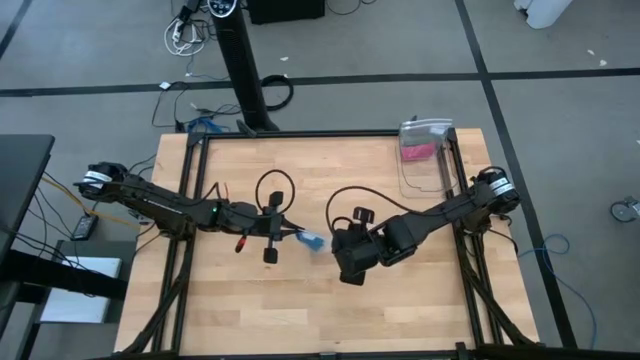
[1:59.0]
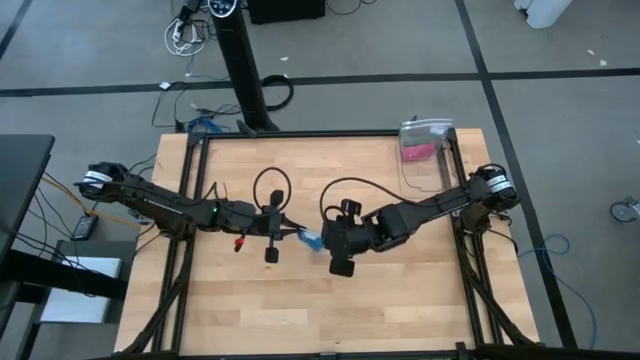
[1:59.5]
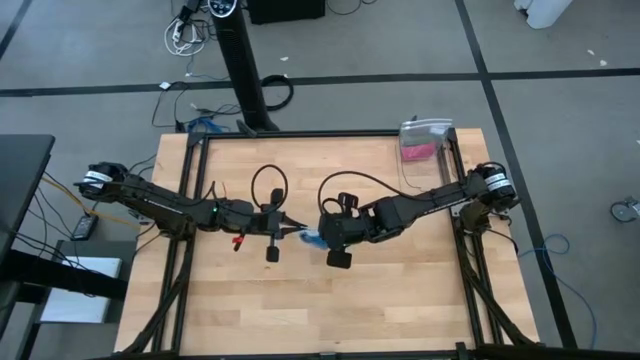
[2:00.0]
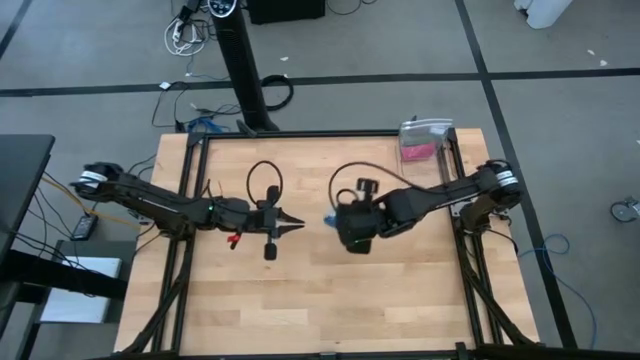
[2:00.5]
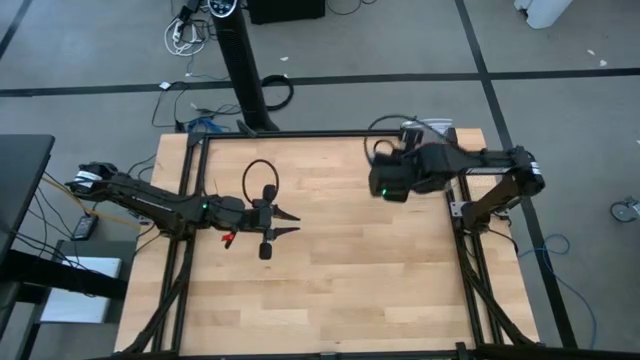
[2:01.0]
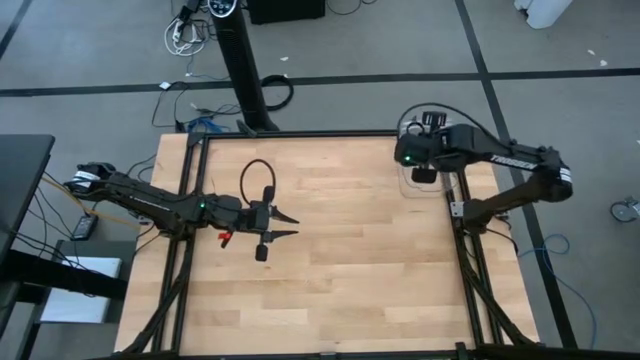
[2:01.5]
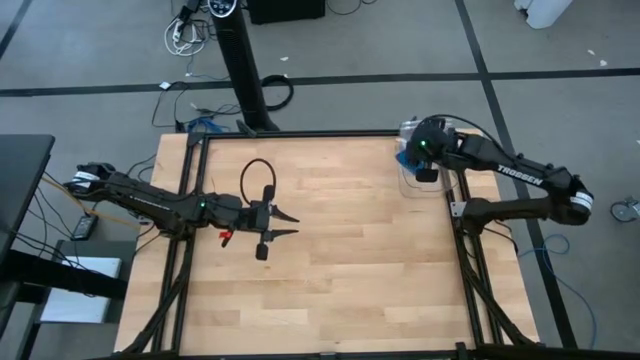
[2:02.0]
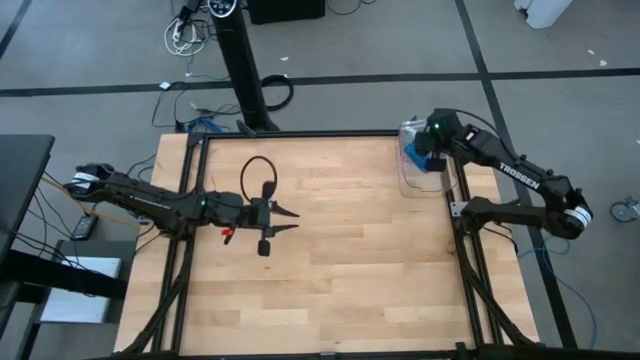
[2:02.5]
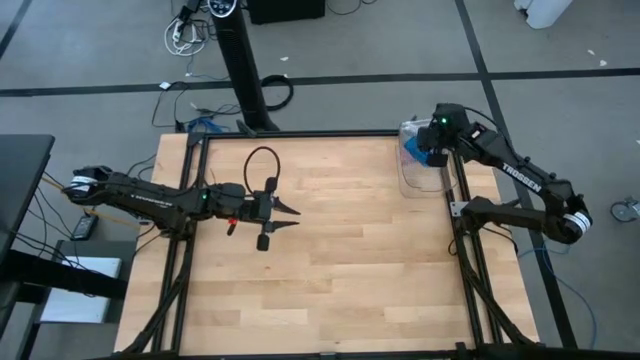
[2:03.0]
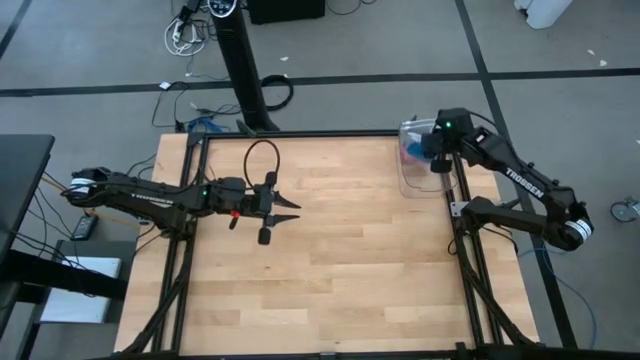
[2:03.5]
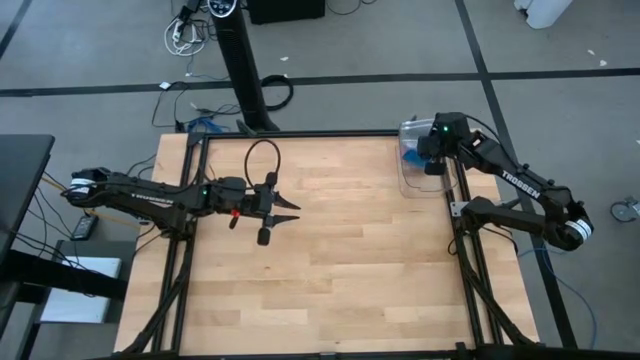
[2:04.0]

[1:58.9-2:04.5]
Task: Roll bandage
Put the transparent zip bag with the blue rolled bandage into the transparent bin

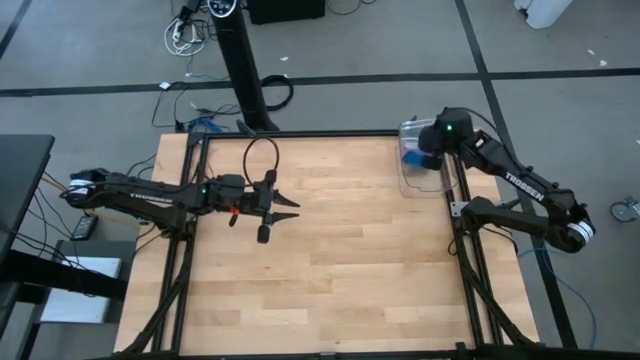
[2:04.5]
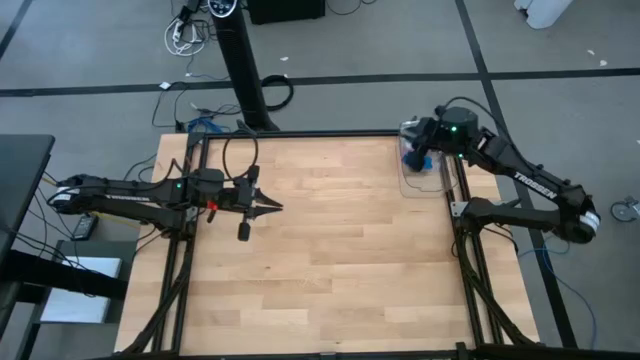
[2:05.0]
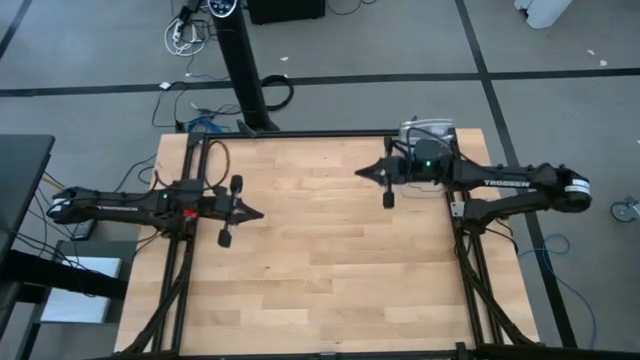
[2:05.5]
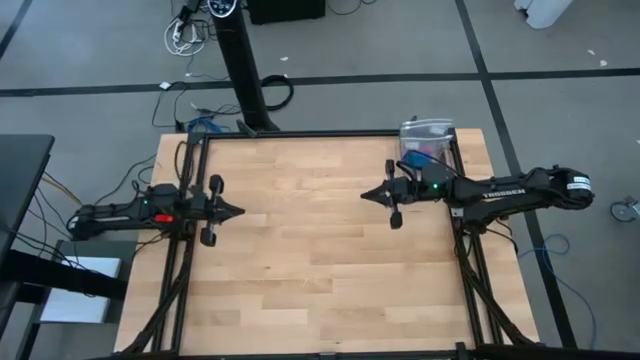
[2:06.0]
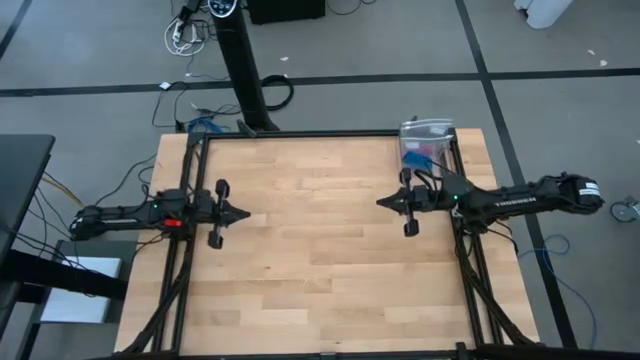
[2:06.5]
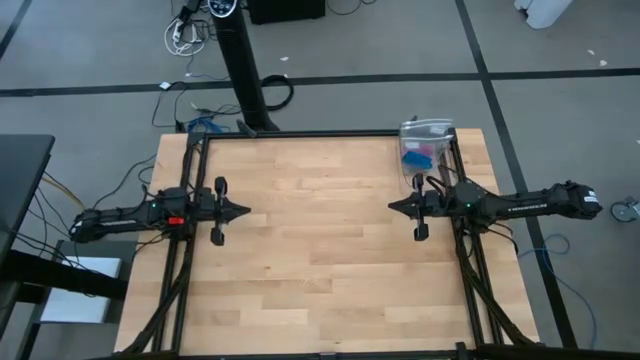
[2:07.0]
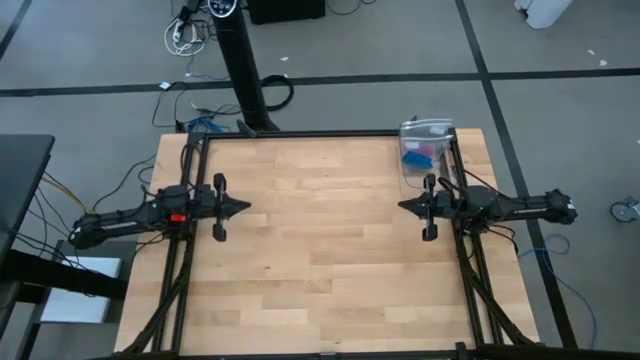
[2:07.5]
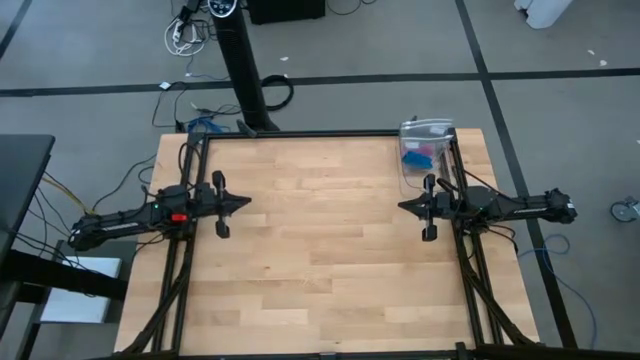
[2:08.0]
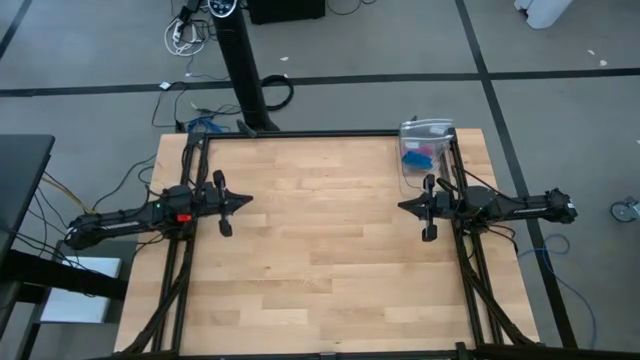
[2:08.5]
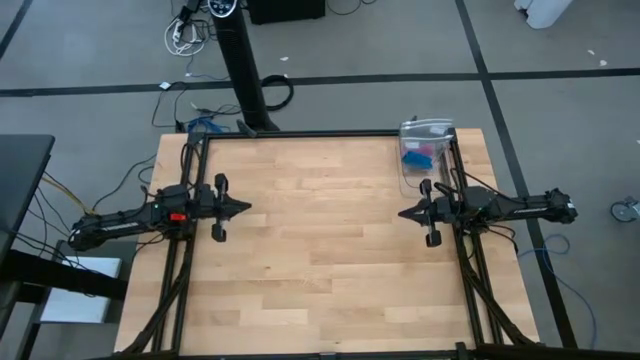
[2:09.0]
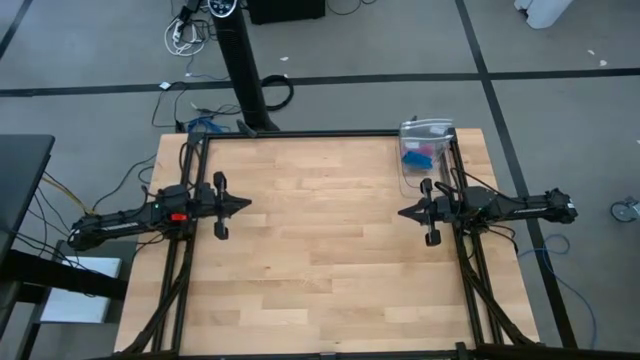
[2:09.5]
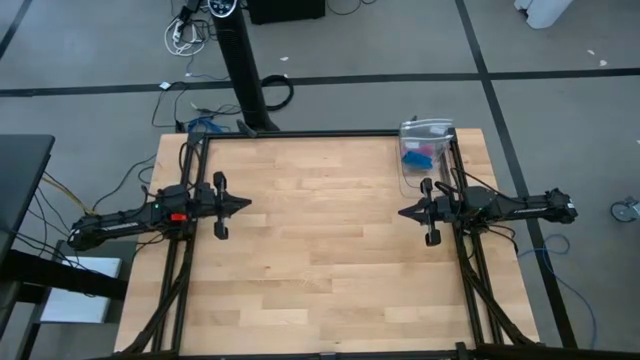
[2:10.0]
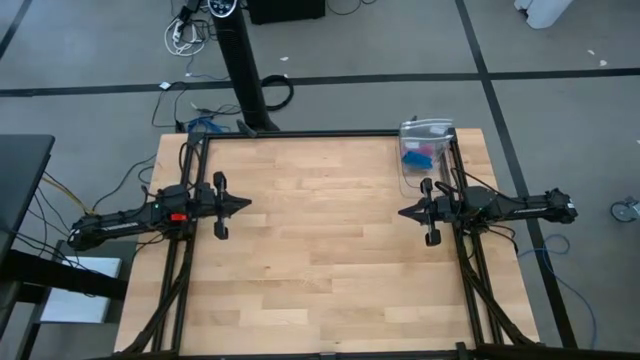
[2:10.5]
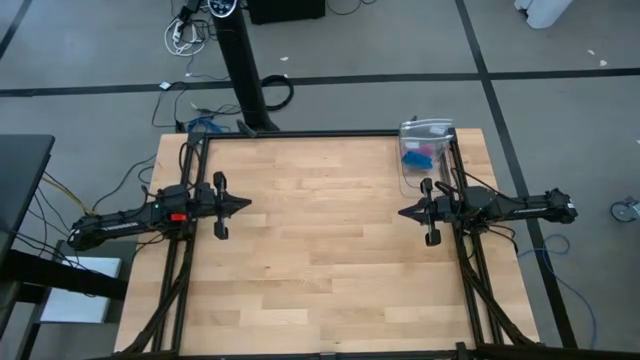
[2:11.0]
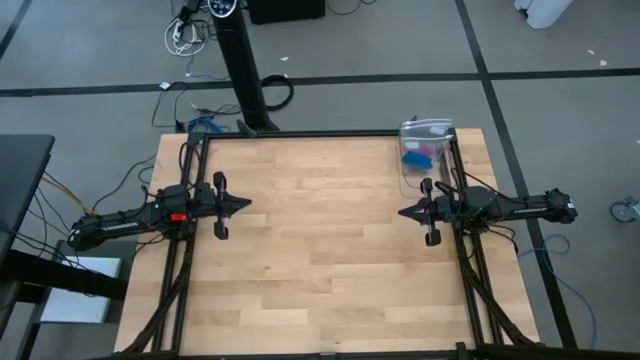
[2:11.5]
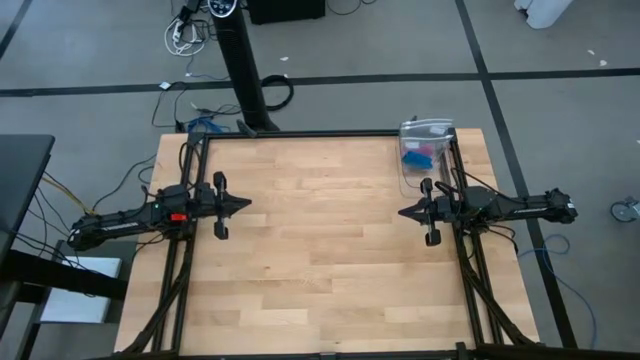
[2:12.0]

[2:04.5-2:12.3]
Return to Home Position

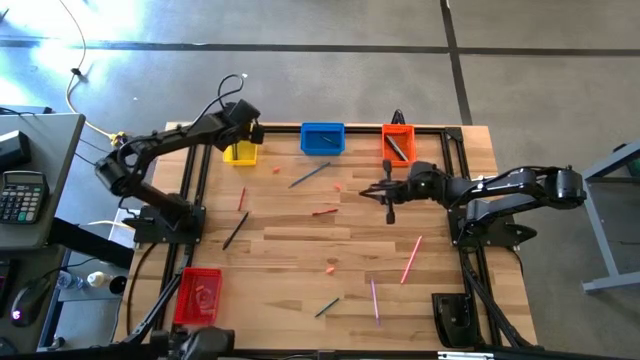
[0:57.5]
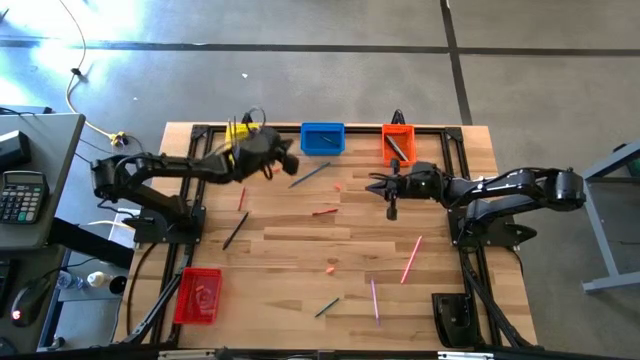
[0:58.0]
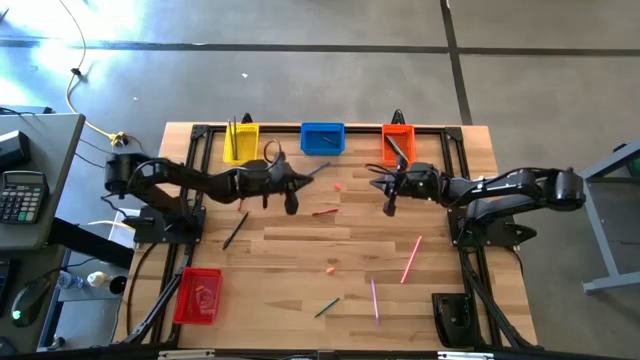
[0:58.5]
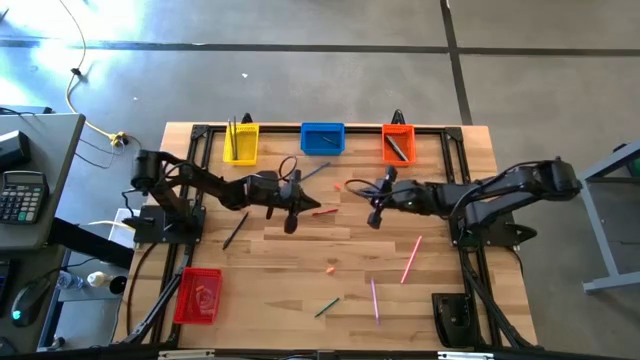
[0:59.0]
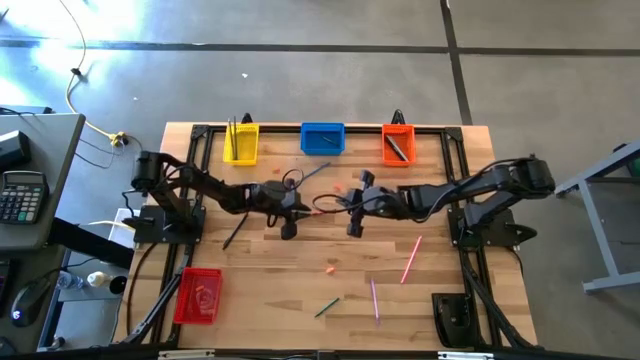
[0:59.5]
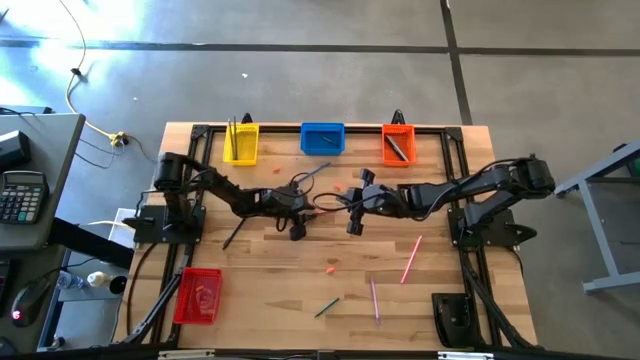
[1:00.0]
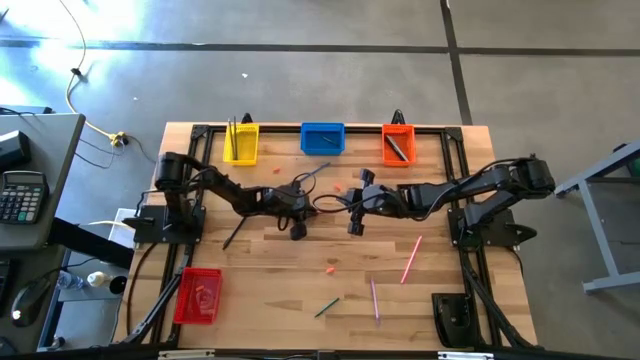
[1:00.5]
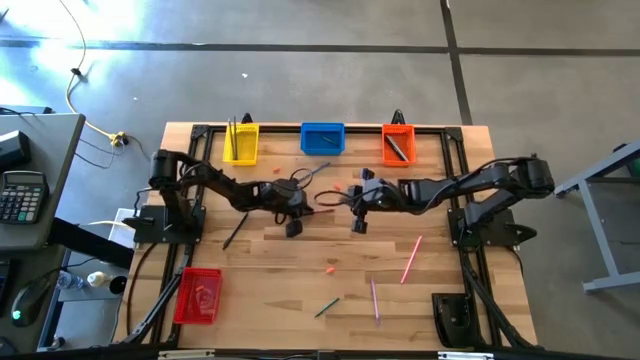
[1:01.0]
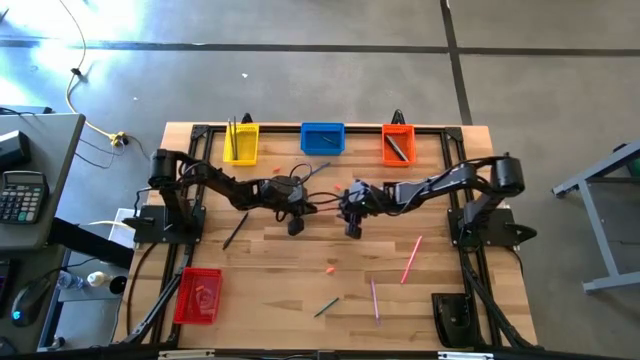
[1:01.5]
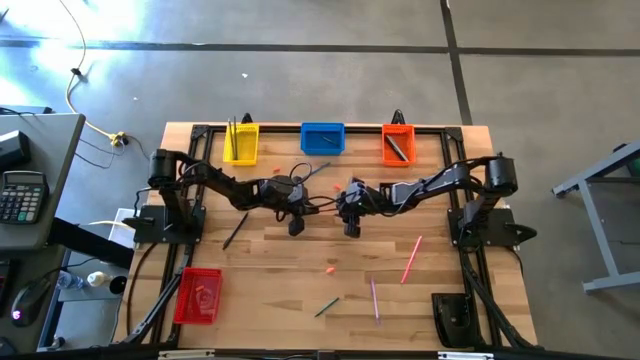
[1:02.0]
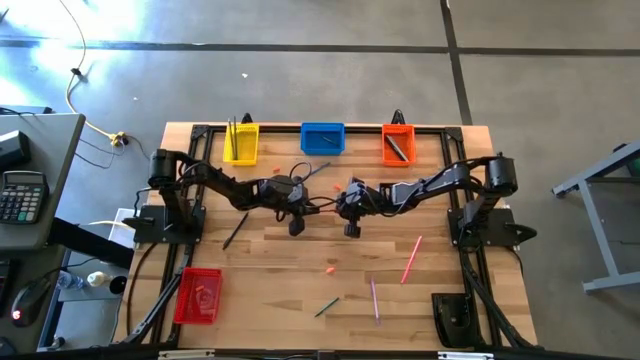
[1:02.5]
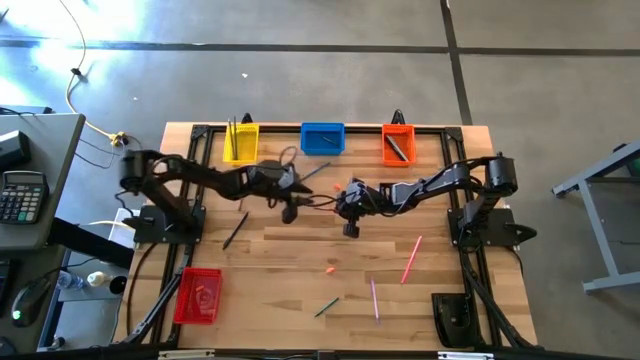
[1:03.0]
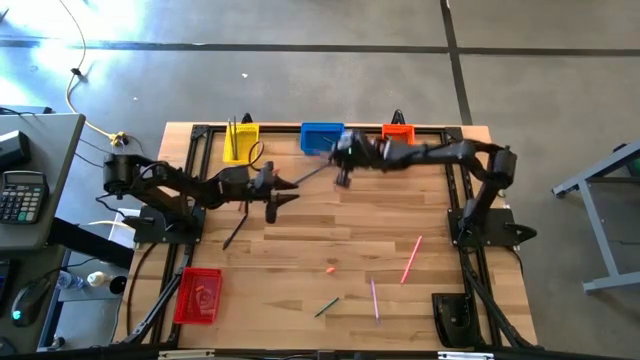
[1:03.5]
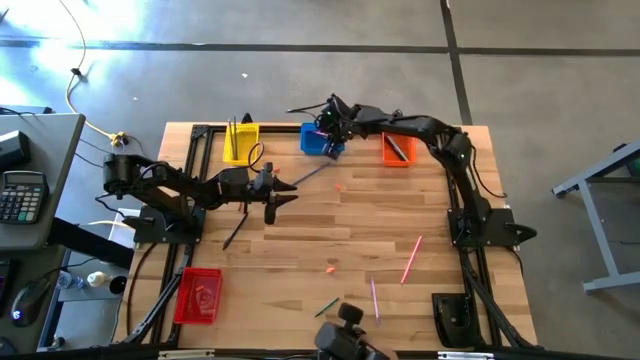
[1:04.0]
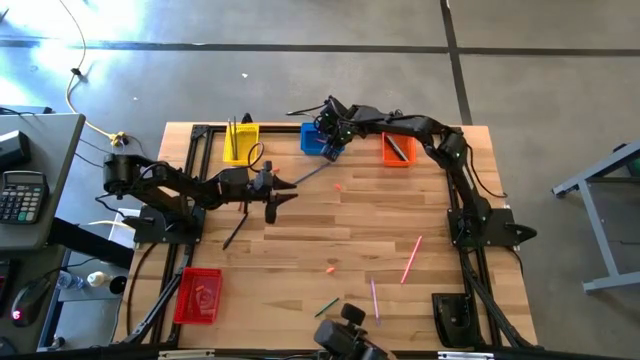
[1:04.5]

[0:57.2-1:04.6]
Task: Sort crayons/erasers/pens/pencils in bins
Put the red crayon into the blue bin

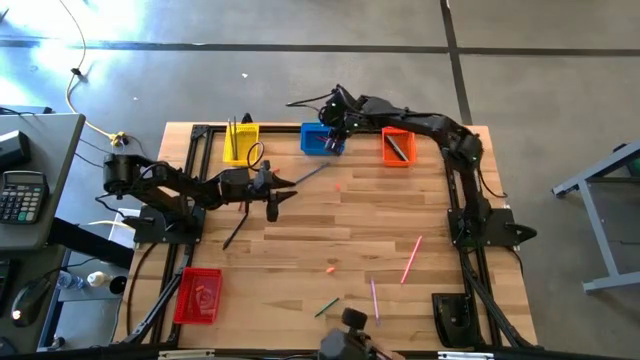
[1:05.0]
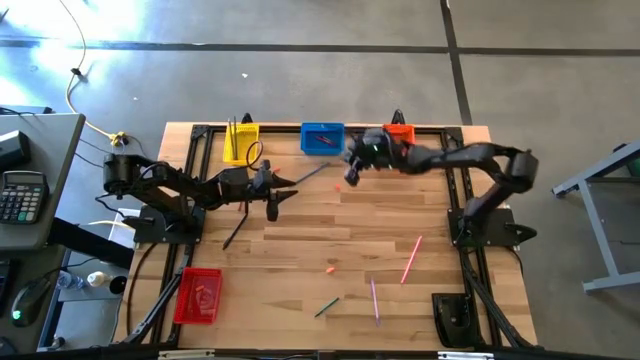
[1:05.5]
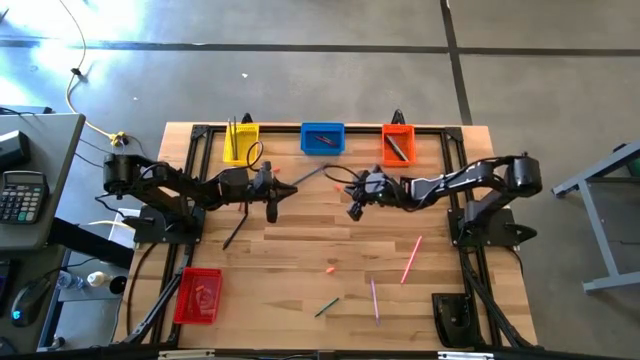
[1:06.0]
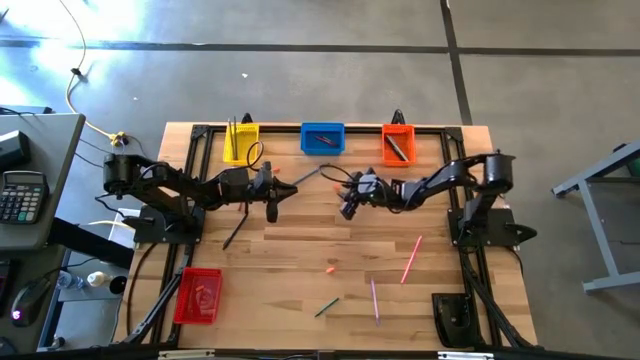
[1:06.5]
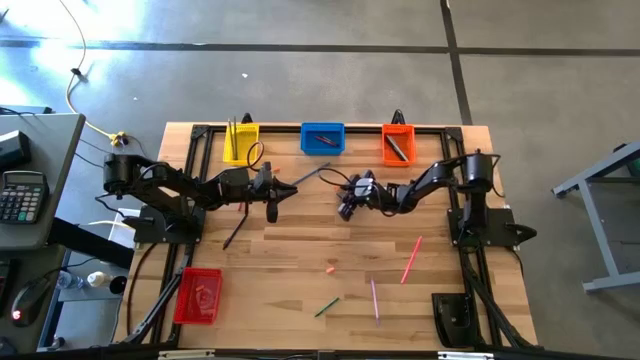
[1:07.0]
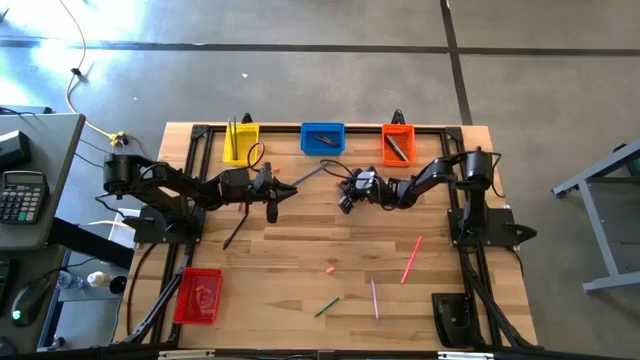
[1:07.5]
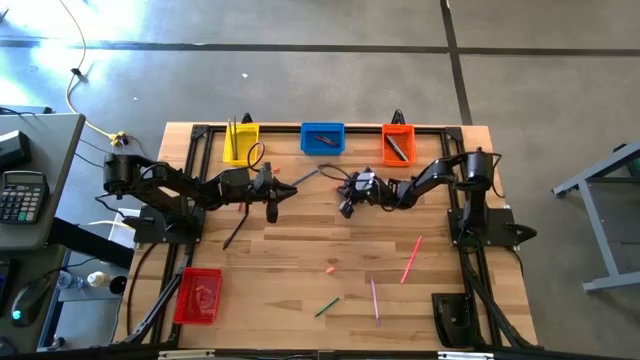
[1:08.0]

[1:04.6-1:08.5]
Put the orange eraser into the red bin
